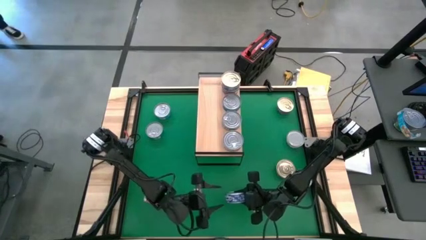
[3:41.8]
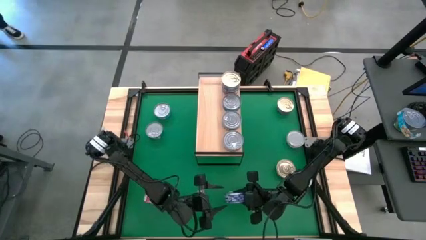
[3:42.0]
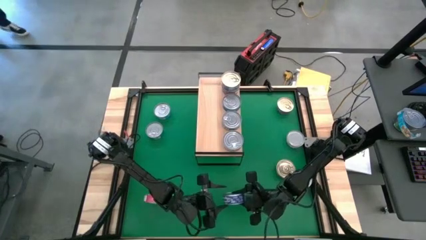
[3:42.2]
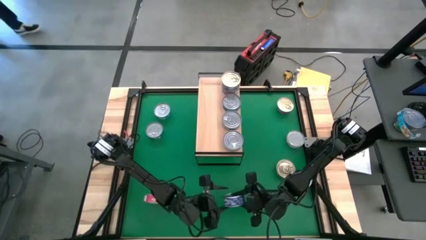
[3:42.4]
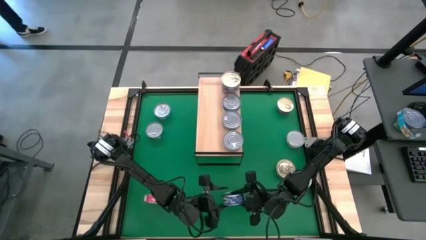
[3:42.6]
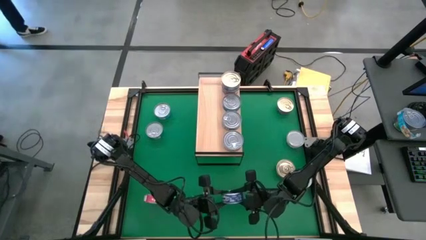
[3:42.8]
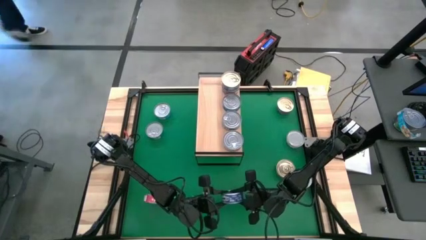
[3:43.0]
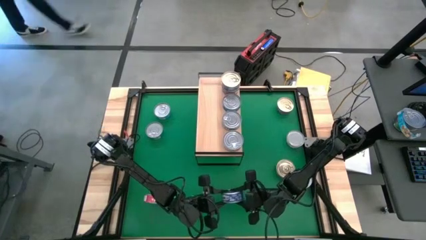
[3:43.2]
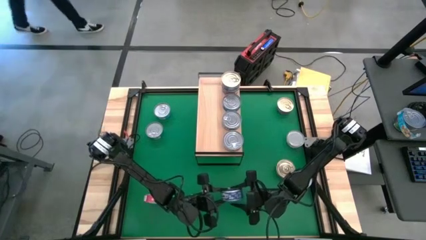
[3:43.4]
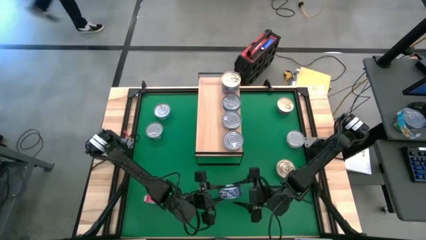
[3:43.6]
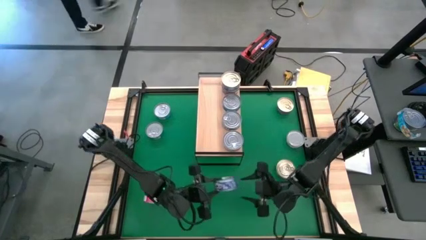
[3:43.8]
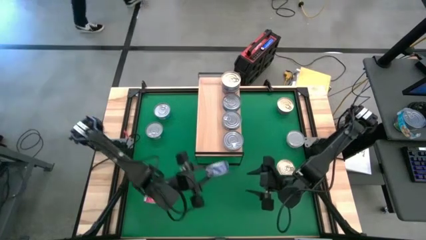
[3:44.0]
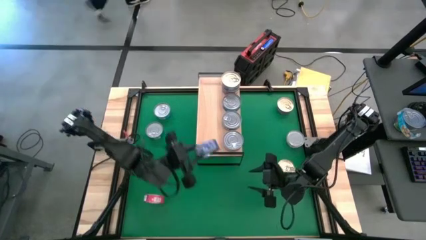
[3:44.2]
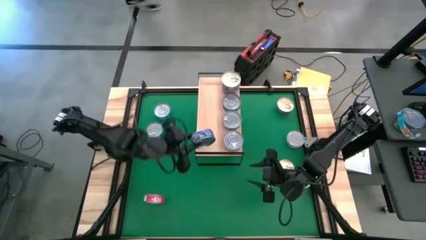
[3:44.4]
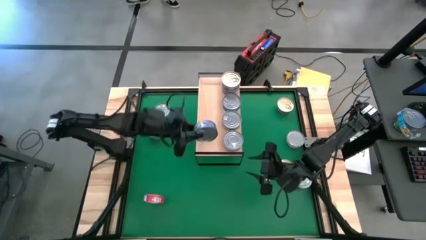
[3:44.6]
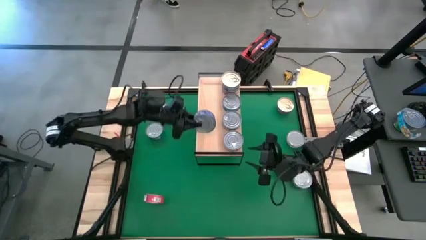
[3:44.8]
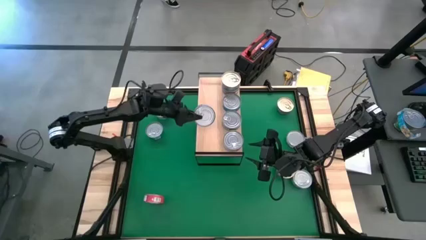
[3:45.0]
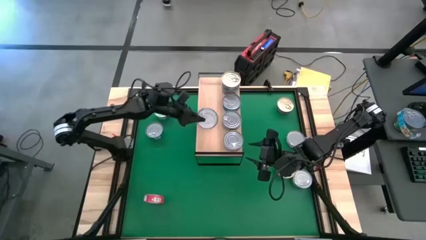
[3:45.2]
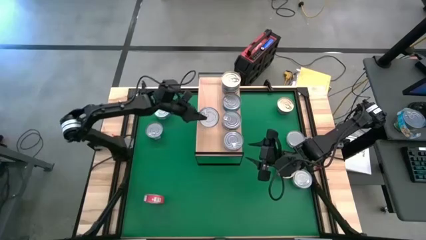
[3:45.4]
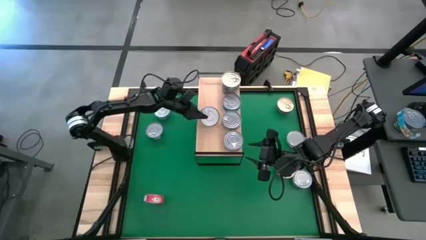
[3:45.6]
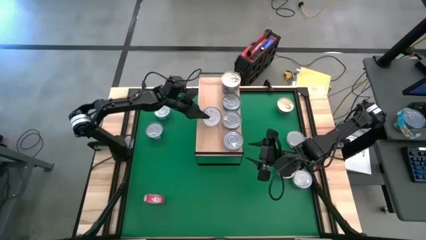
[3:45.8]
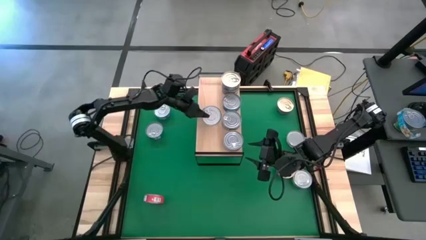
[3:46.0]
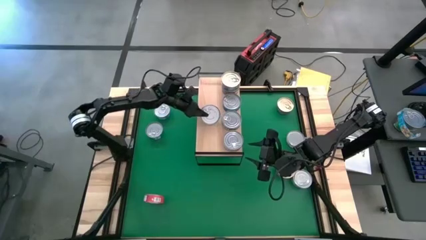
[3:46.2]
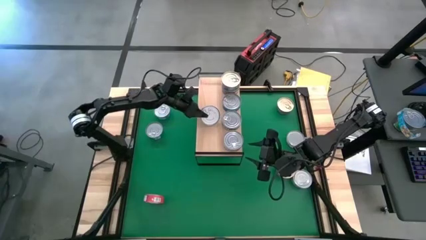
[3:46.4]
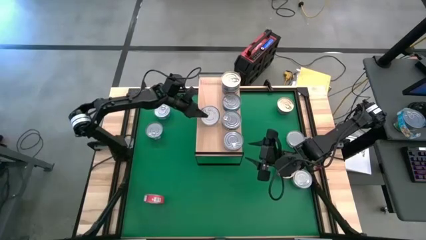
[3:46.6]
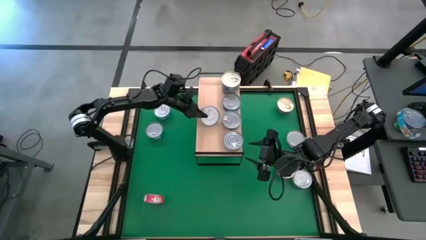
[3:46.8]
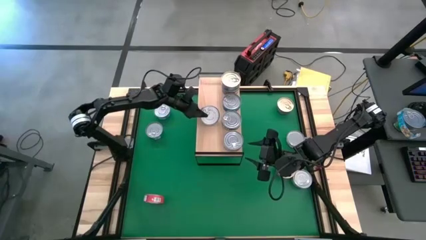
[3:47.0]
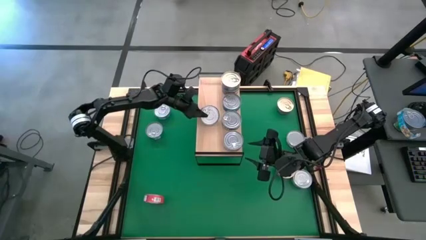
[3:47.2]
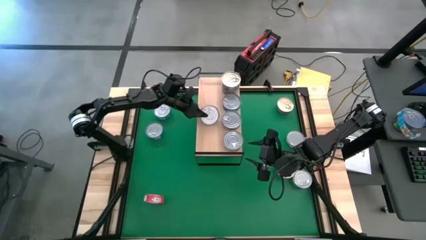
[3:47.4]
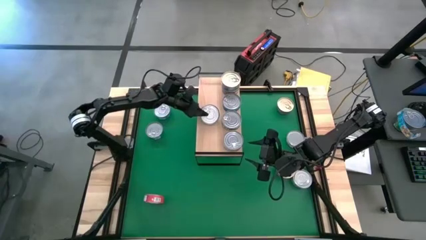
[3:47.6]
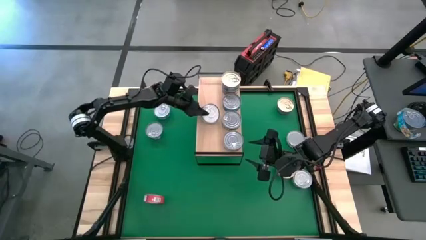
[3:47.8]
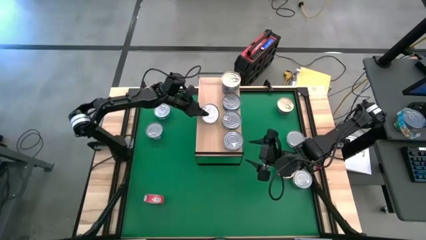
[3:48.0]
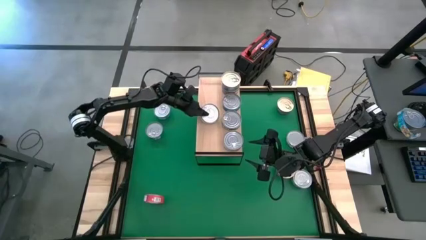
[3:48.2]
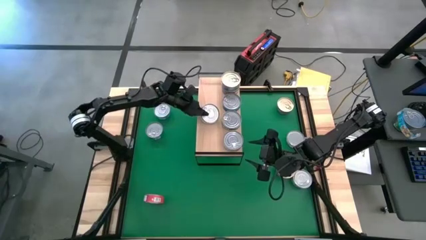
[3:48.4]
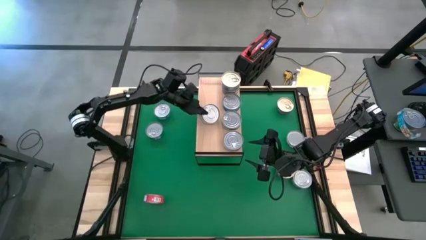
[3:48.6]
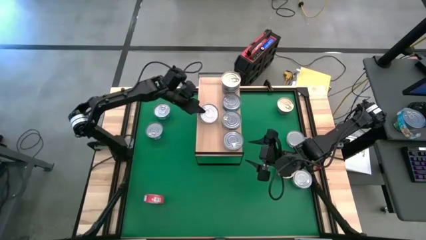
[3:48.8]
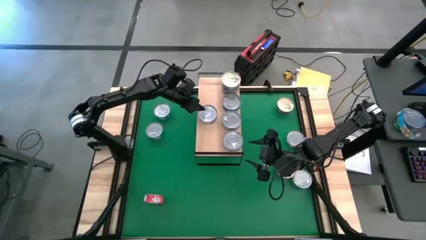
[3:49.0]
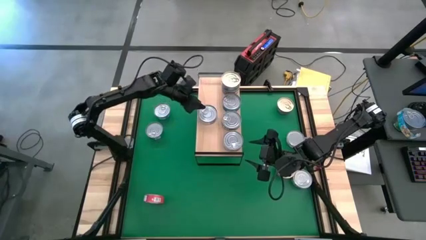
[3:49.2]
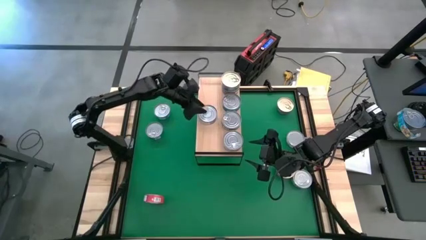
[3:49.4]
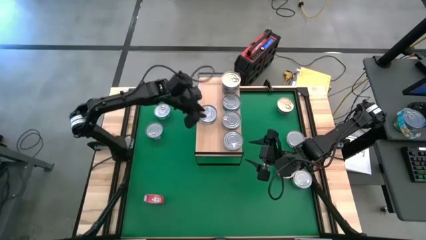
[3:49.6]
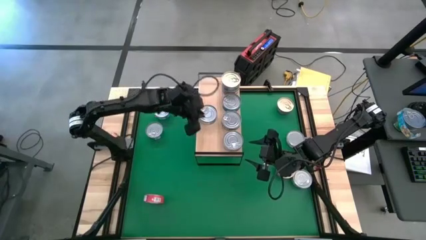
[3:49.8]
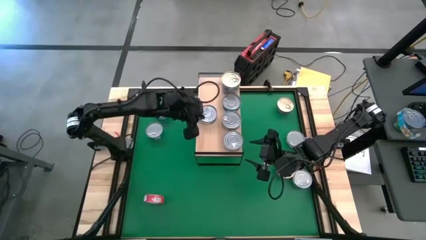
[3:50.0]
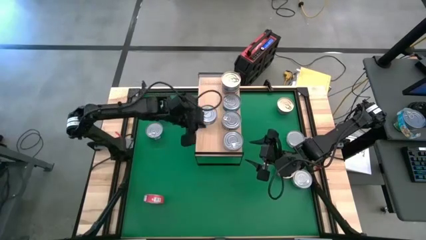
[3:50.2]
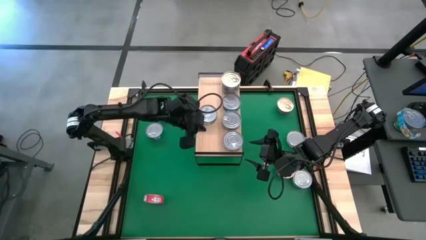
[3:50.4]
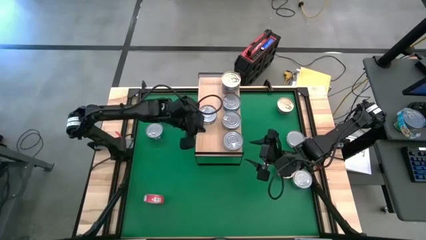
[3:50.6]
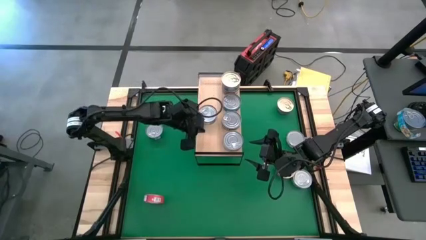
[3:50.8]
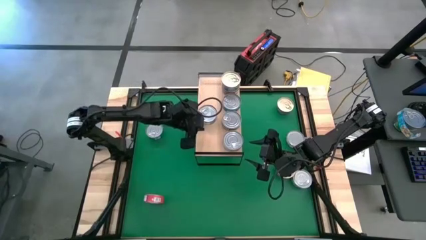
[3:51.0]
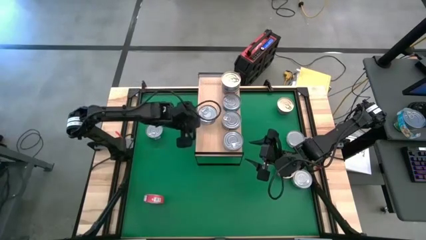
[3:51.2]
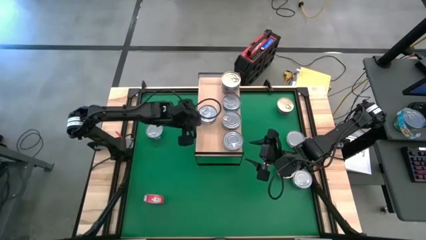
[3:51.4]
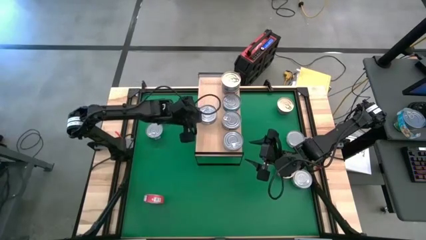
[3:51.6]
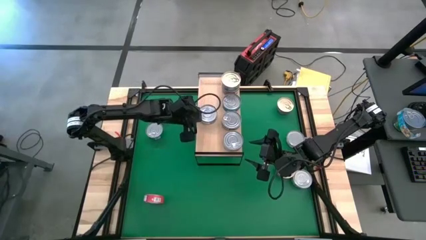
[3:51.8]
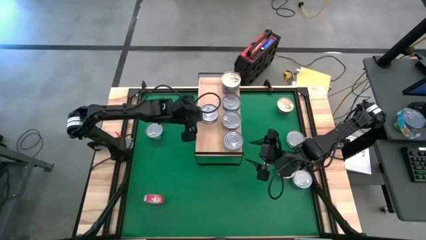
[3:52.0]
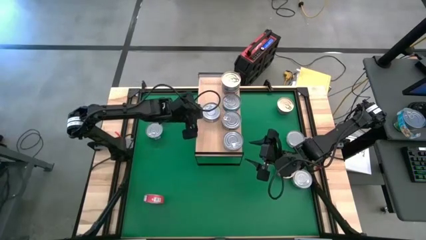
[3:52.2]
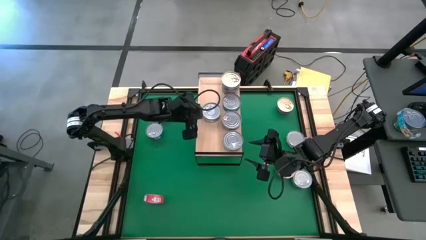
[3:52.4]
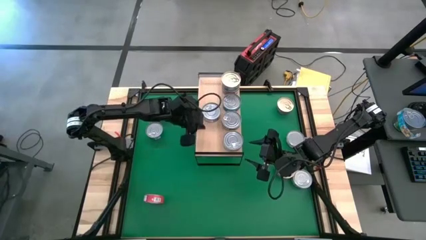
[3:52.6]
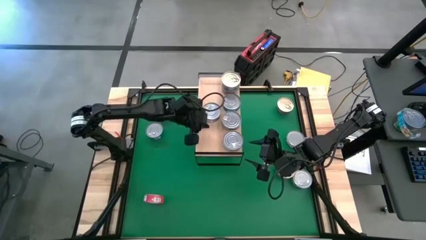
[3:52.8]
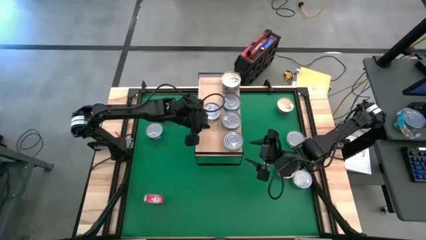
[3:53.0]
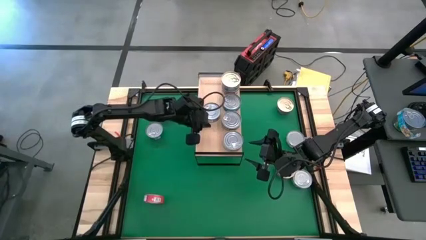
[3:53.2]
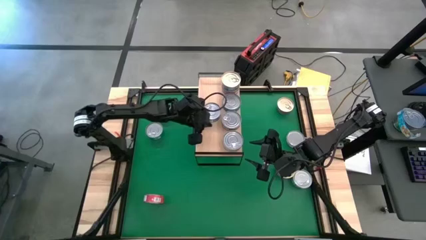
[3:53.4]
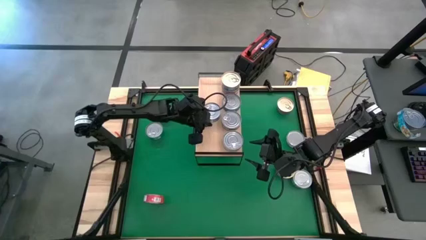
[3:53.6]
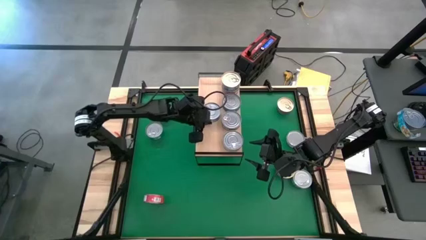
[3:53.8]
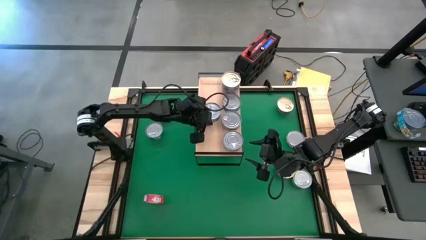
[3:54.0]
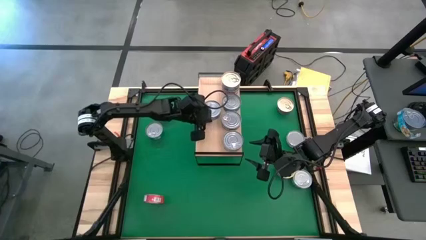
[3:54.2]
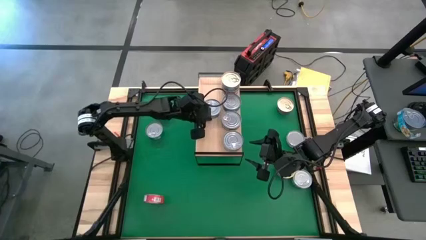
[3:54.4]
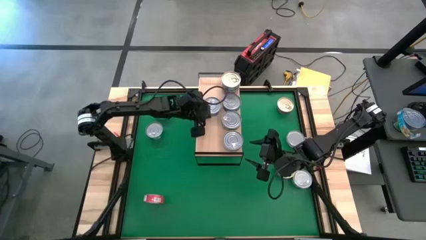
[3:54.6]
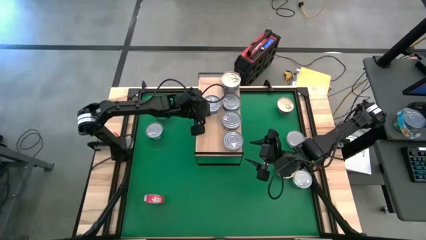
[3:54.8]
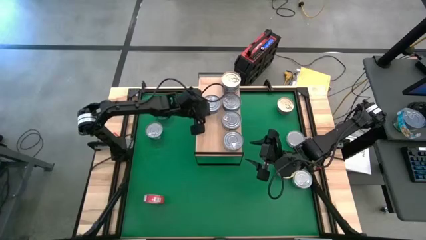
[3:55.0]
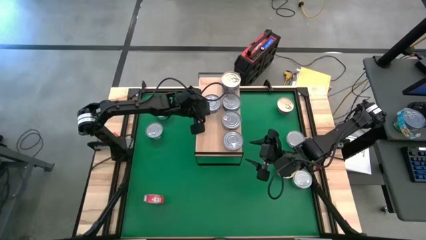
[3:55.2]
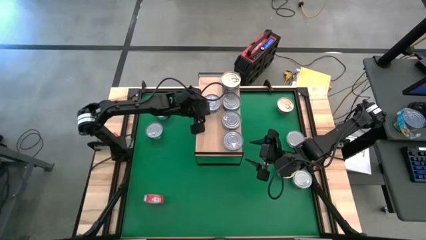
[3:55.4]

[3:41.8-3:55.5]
Task: Stack canned seafood by type on shelf
Put the top blue tuna can on the shelf
